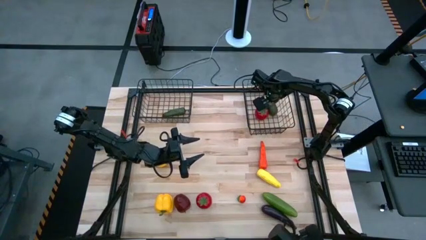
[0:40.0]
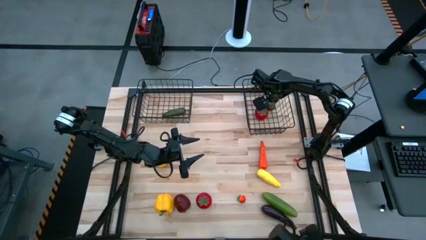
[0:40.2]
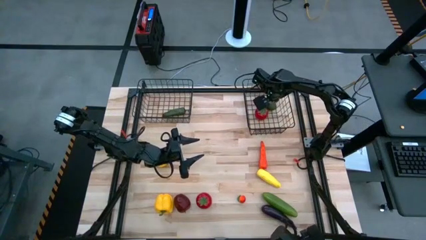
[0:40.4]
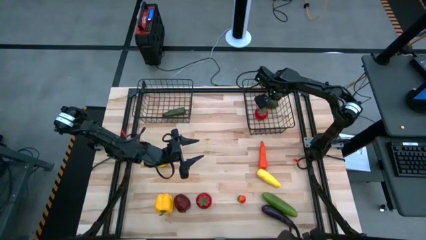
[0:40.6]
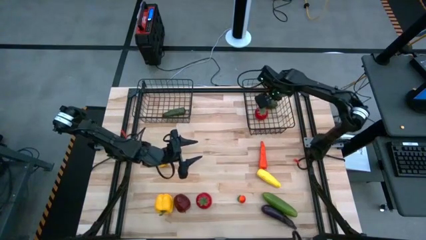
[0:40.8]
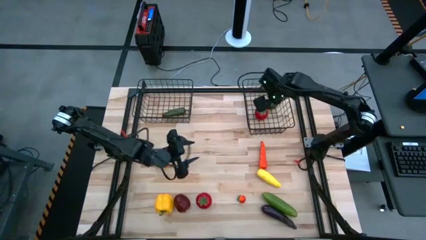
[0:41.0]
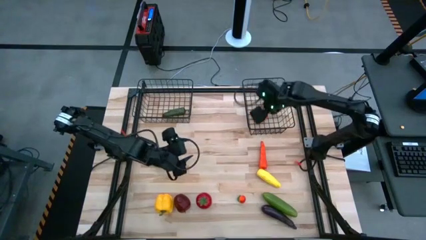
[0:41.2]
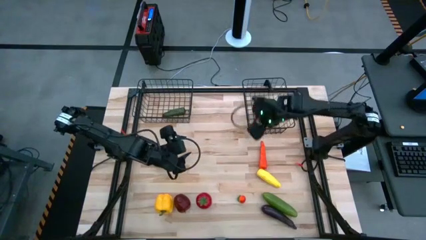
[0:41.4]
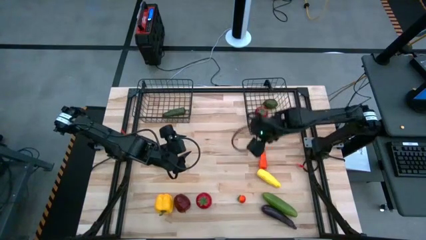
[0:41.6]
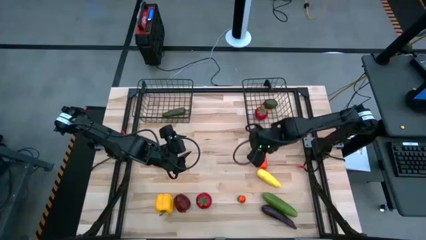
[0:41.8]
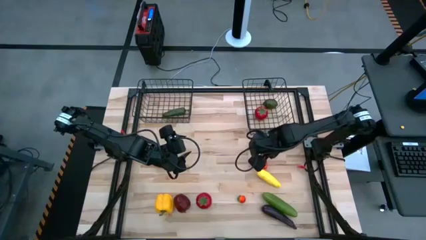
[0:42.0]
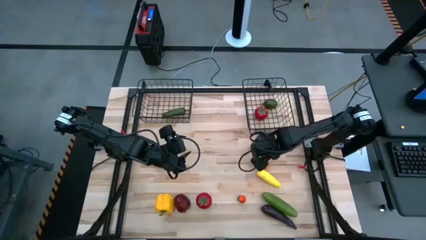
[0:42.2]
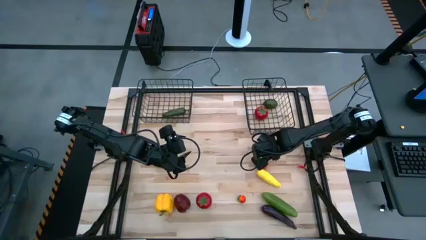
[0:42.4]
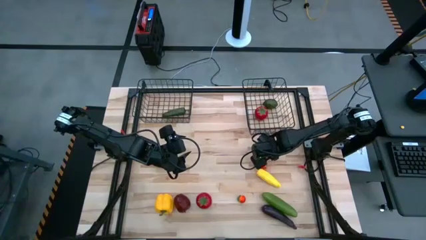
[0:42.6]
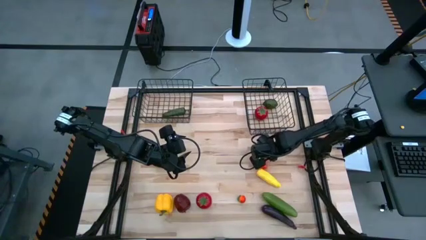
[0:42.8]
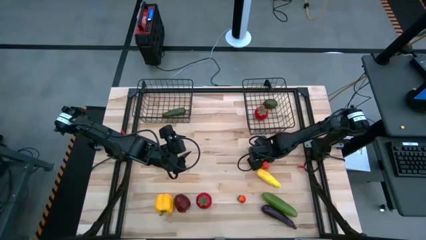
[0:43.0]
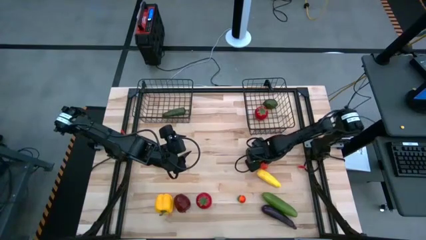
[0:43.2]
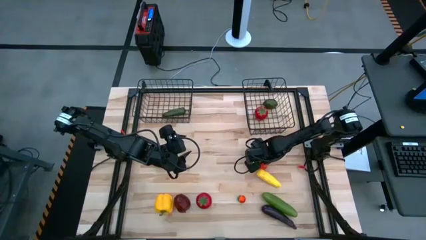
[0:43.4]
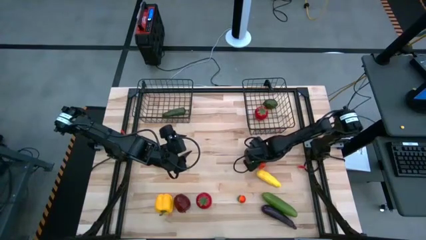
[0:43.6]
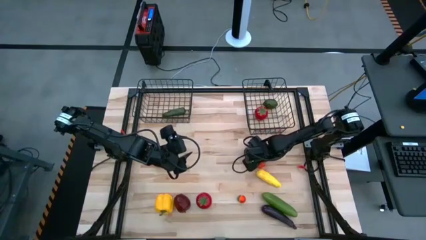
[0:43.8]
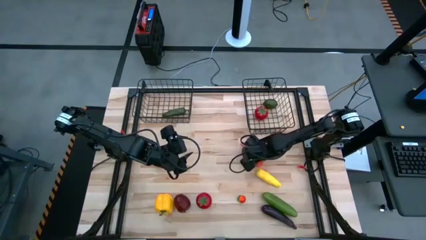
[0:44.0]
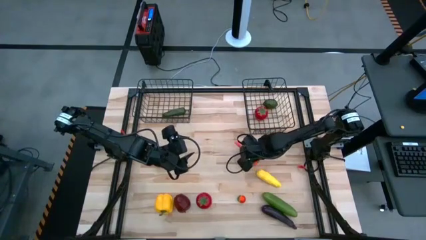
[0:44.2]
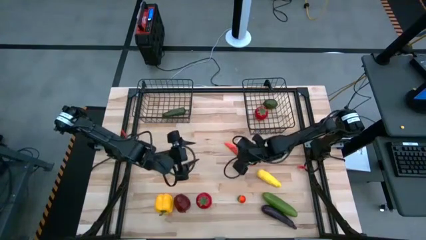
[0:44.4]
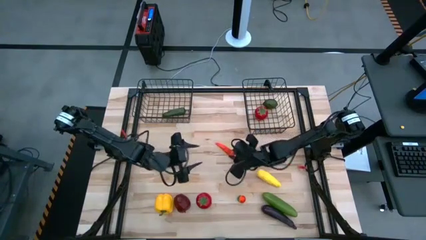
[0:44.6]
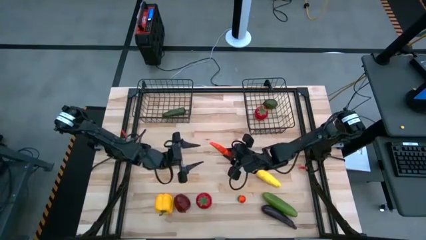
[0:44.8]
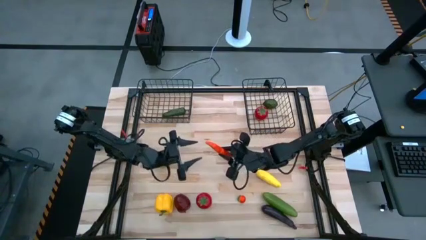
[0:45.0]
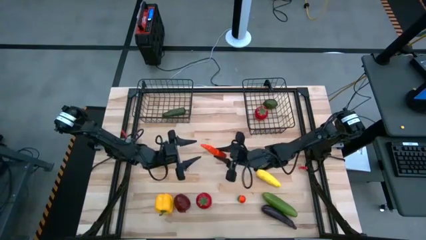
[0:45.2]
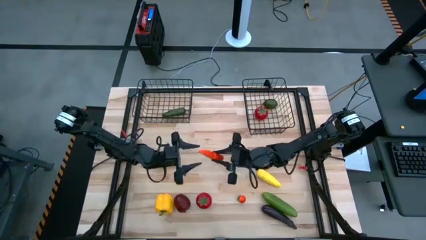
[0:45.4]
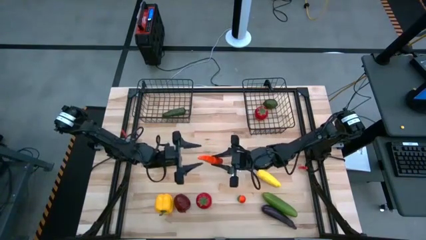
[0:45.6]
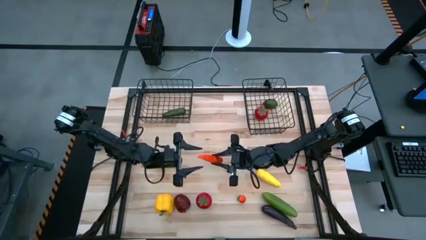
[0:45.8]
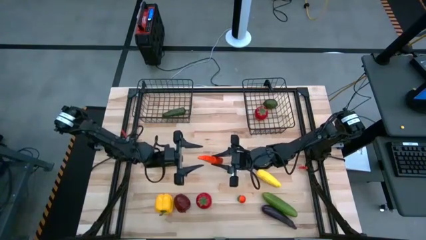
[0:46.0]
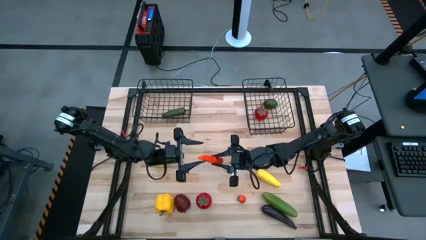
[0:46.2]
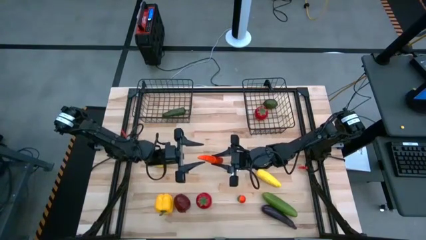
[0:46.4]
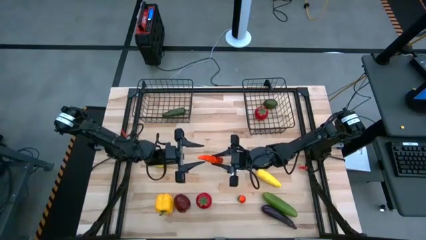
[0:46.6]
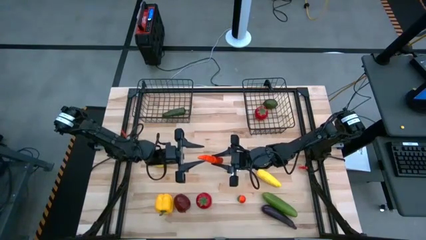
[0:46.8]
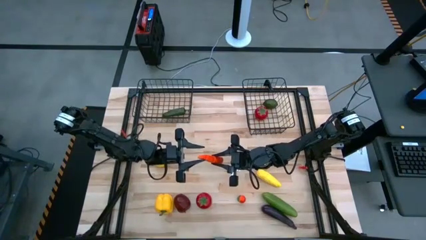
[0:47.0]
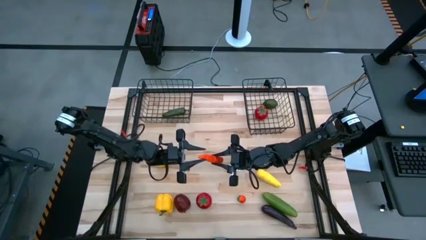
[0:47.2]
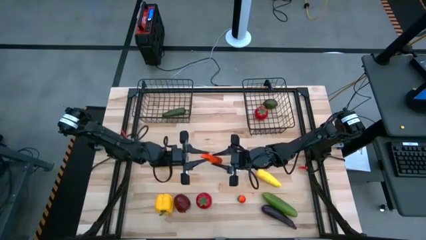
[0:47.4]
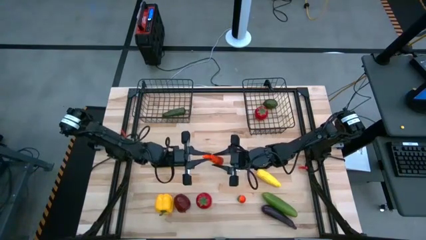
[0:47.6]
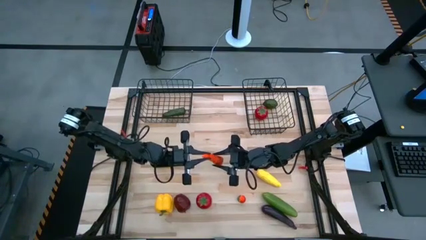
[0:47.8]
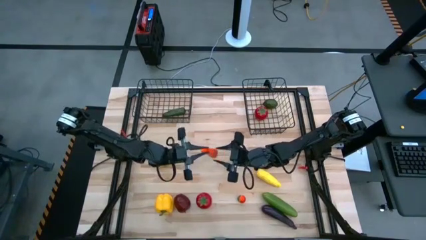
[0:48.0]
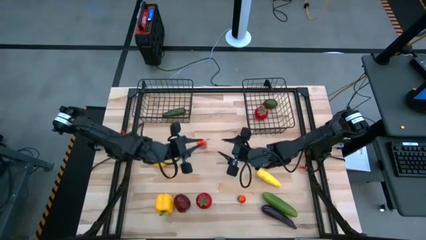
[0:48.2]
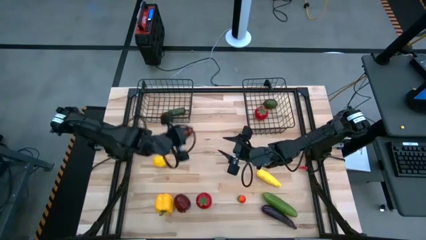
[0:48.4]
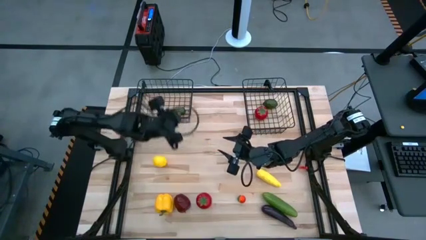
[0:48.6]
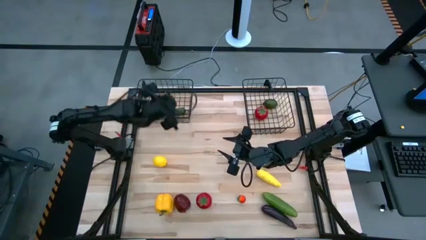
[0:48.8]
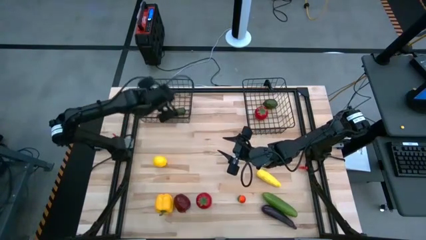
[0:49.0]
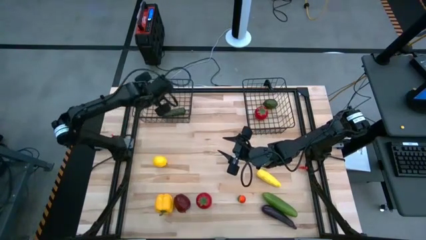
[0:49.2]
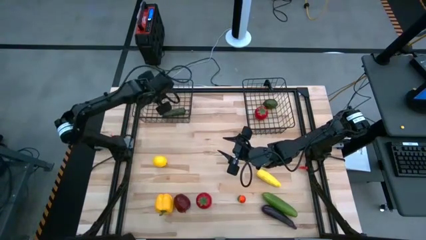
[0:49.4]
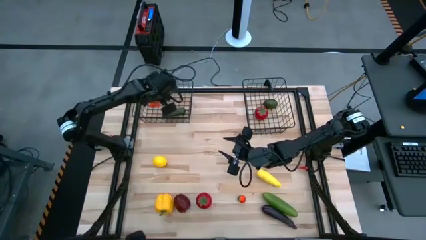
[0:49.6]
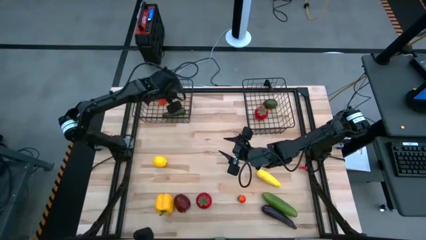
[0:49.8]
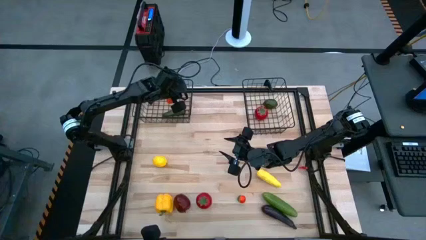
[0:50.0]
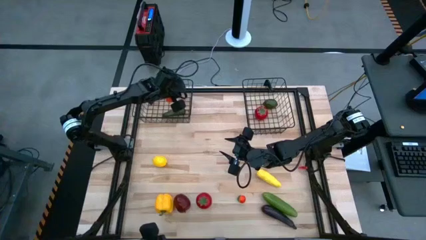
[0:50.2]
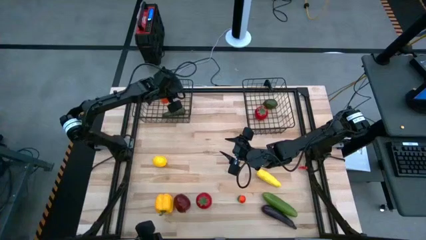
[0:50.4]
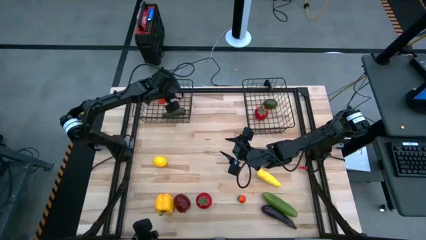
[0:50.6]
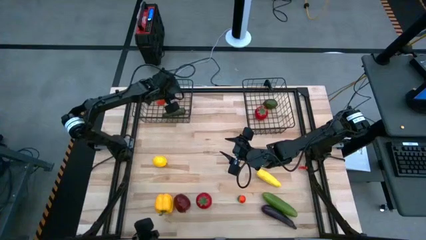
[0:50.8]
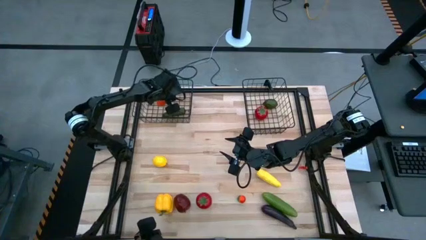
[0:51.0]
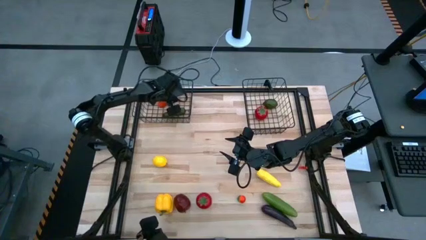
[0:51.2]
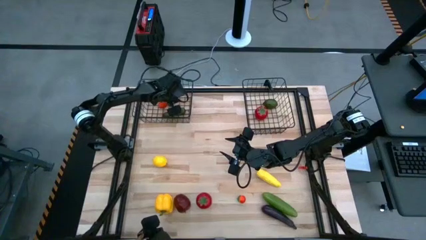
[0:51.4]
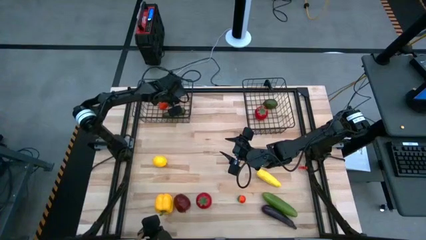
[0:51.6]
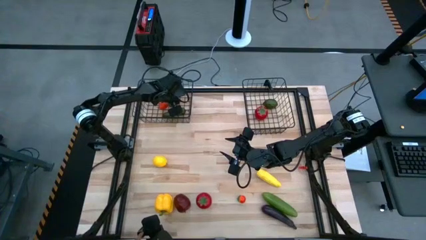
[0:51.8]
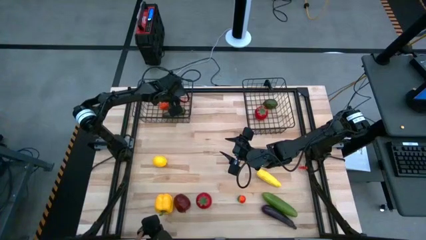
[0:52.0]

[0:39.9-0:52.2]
Task: Sort produce into baskets
Put the orange carrot into the left black wire basket

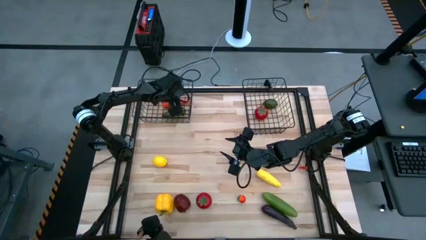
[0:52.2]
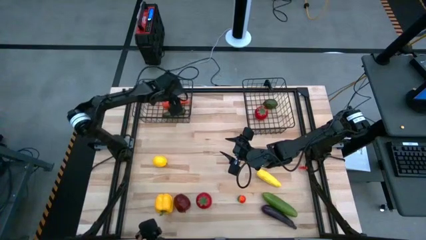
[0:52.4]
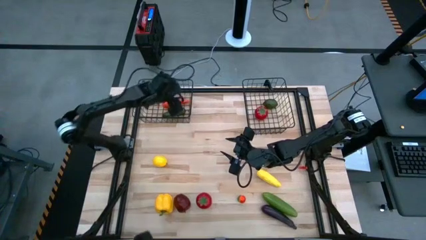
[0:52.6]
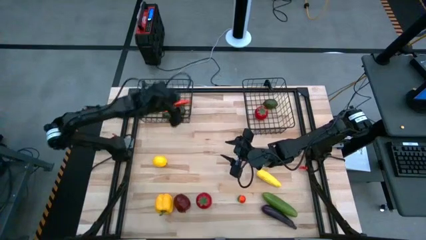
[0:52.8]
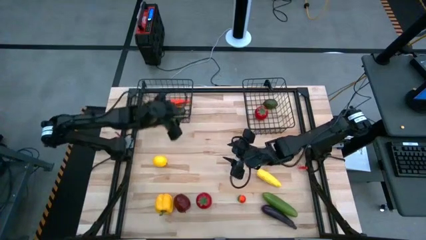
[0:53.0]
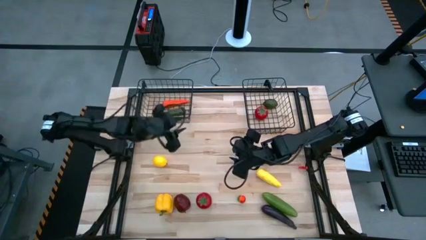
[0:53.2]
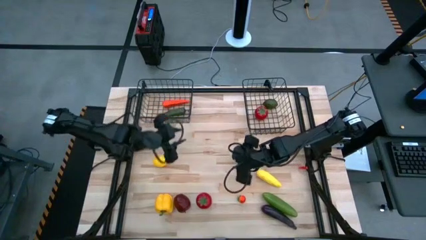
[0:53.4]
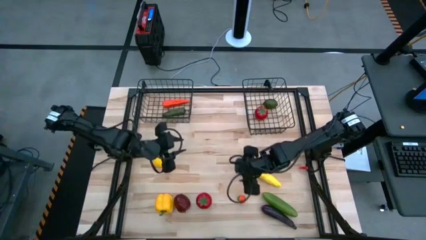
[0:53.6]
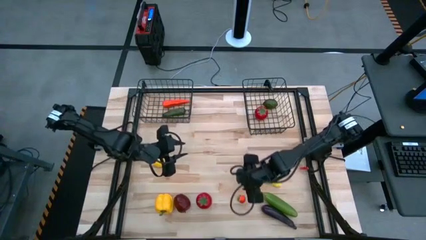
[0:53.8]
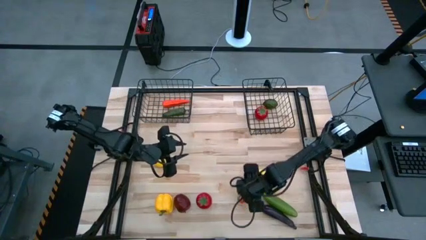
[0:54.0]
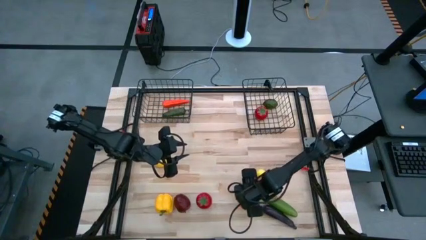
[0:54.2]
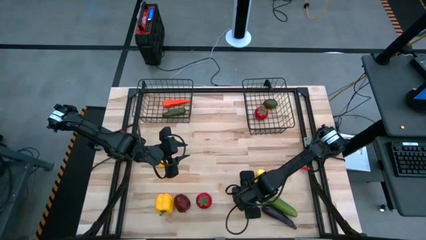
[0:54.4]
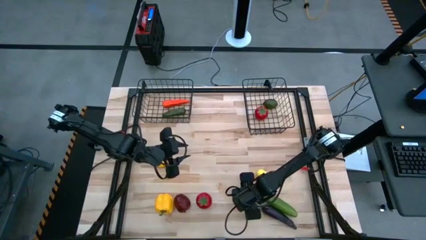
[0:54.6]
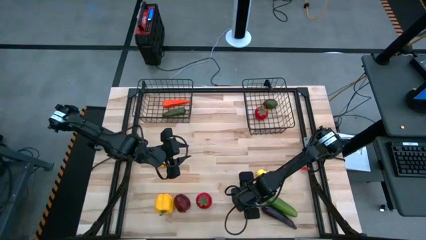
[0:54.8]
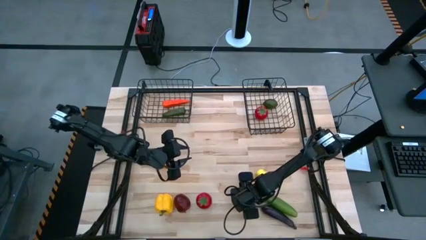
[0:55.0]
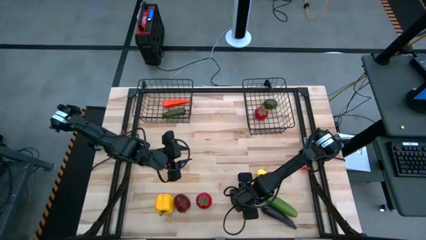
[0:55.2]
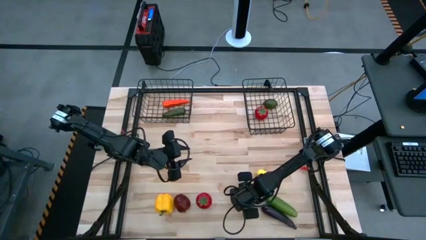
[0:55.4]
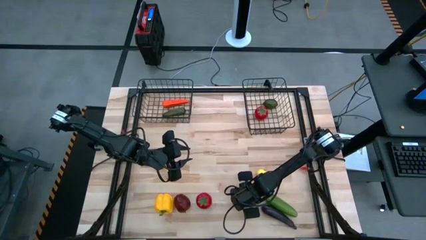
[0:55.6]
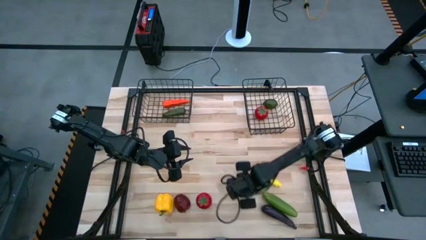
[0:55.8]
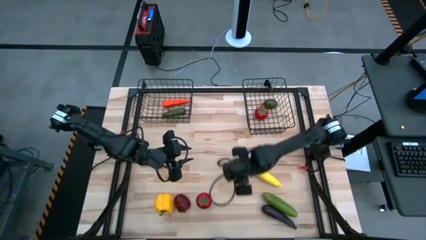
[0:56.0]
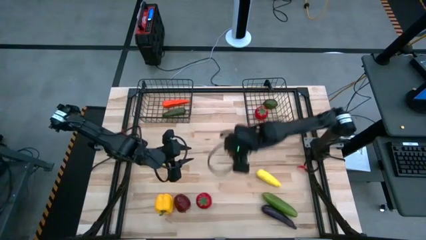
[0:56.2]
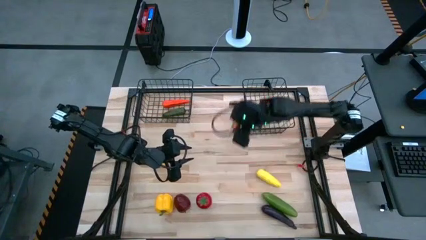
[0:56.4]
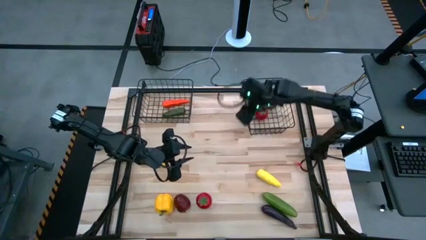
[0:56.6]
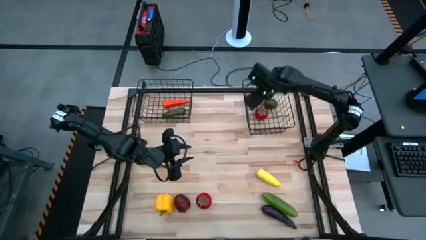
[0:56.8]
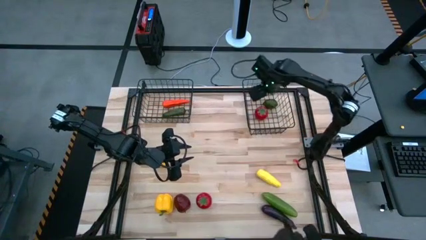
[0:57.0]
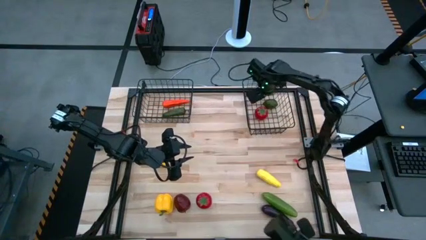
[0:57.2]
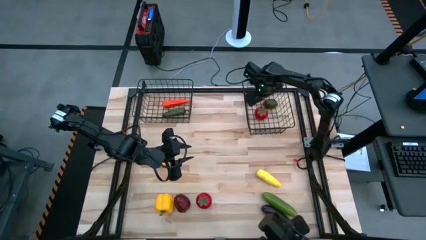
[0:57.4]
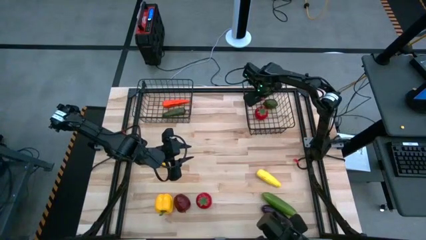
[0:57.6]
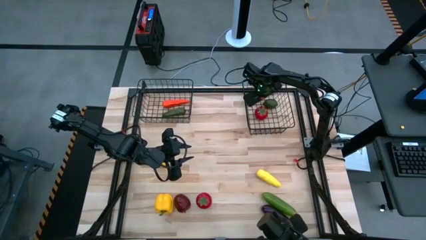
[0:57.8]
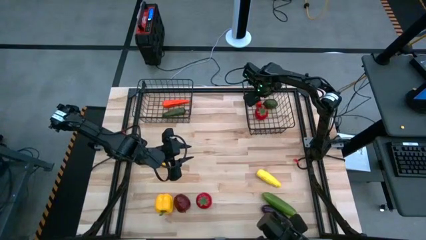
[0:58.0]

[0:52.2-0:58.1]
Put the red peach into the right black wire basket
